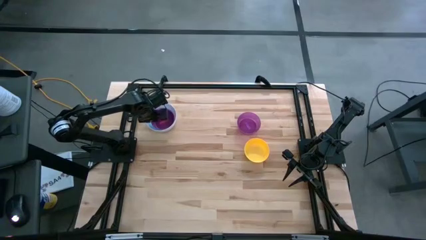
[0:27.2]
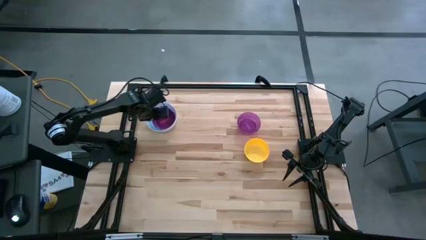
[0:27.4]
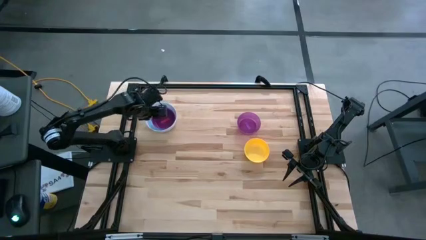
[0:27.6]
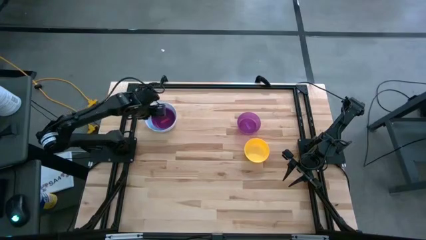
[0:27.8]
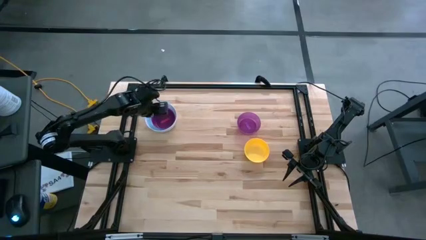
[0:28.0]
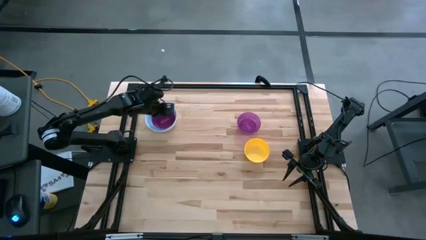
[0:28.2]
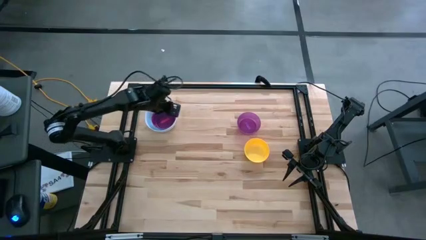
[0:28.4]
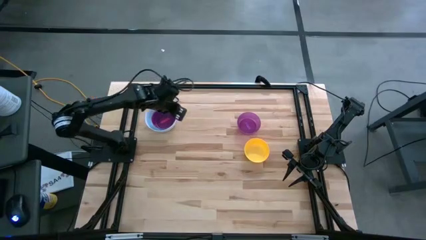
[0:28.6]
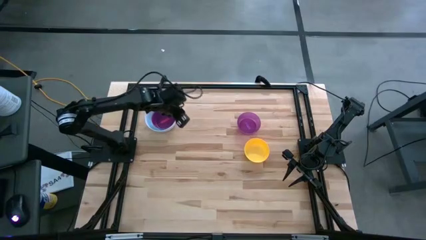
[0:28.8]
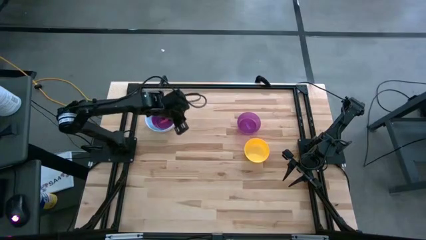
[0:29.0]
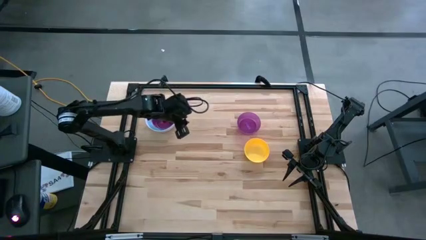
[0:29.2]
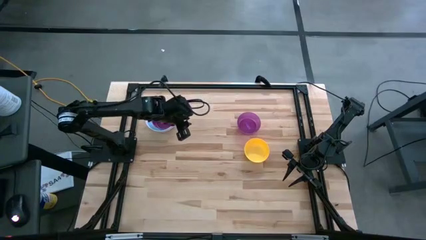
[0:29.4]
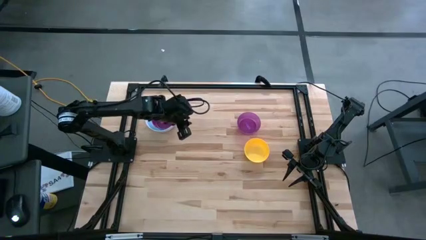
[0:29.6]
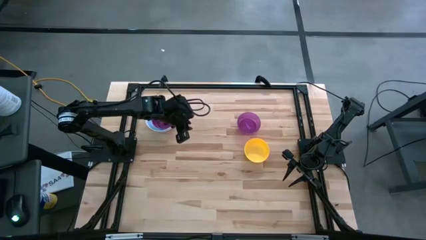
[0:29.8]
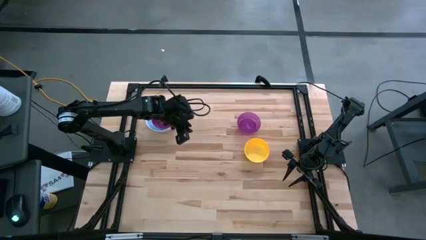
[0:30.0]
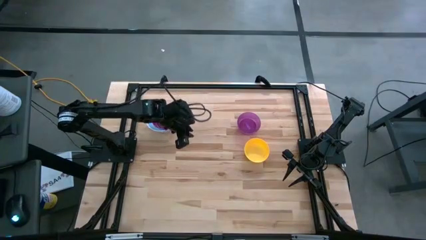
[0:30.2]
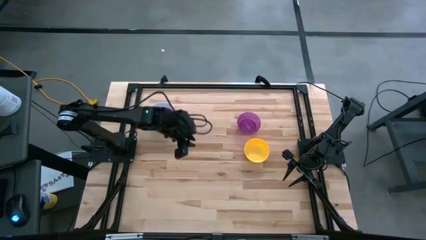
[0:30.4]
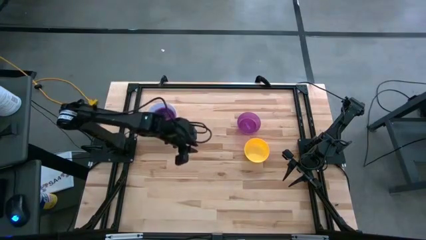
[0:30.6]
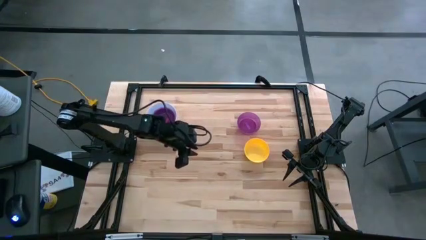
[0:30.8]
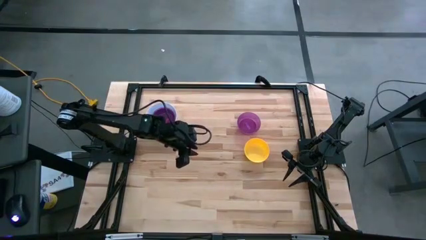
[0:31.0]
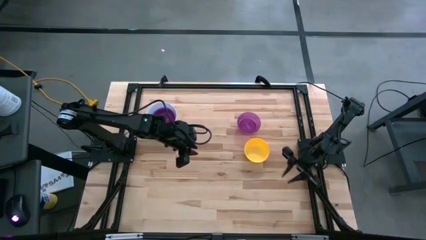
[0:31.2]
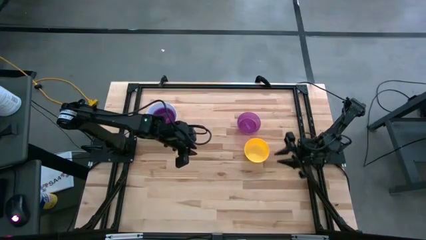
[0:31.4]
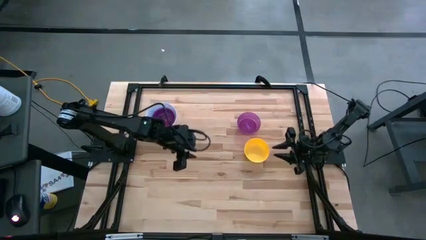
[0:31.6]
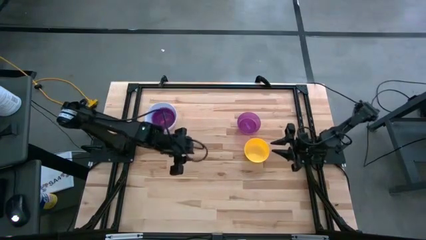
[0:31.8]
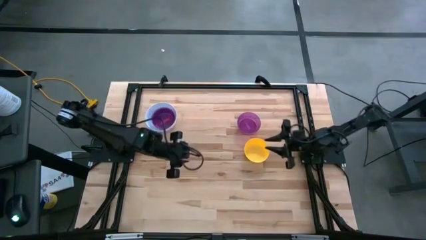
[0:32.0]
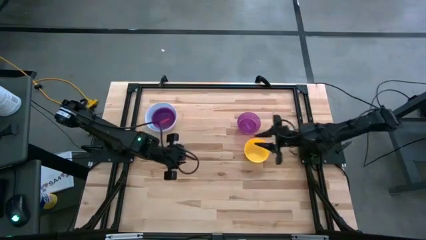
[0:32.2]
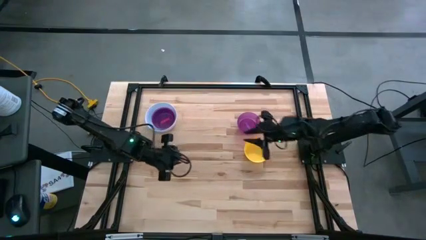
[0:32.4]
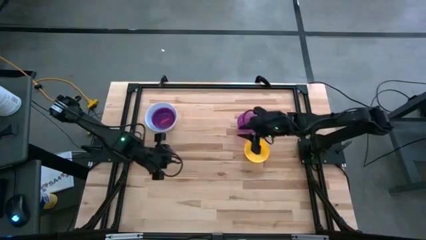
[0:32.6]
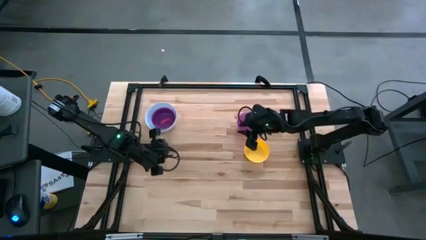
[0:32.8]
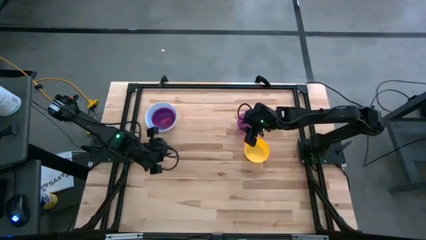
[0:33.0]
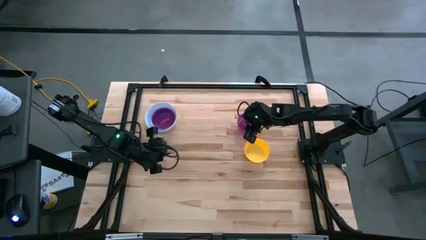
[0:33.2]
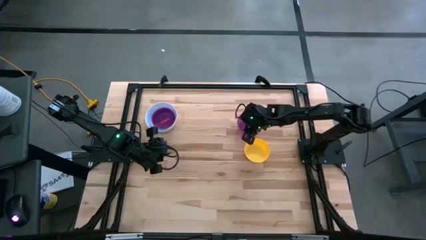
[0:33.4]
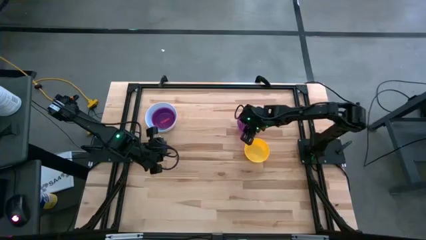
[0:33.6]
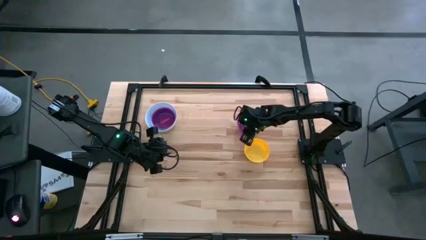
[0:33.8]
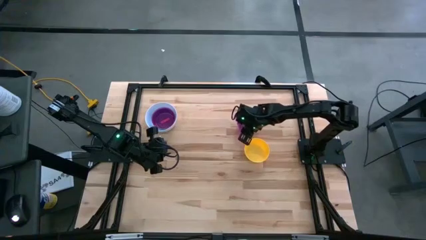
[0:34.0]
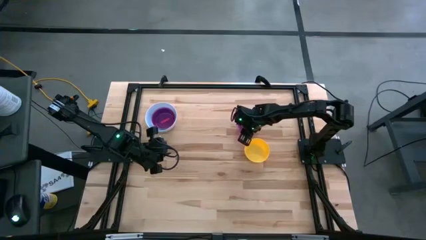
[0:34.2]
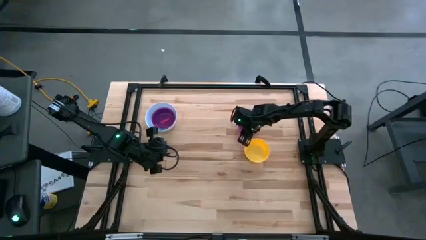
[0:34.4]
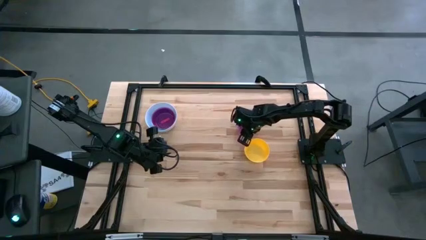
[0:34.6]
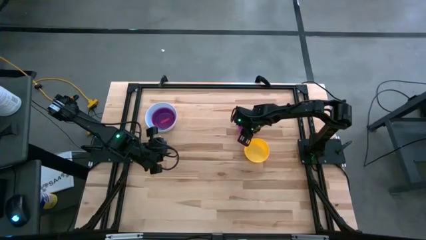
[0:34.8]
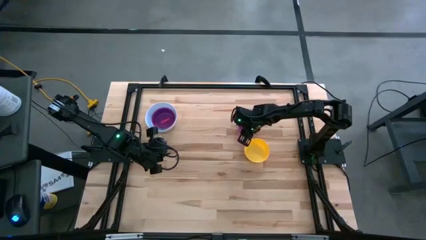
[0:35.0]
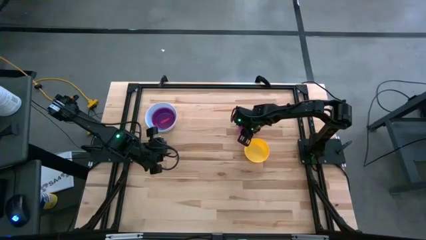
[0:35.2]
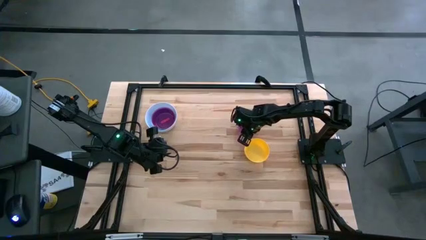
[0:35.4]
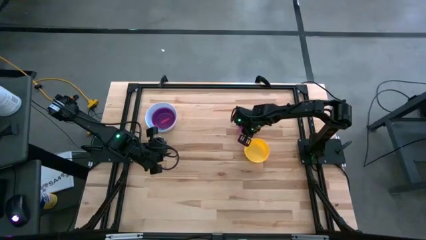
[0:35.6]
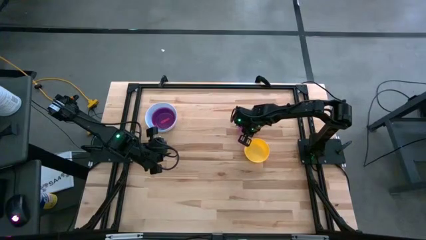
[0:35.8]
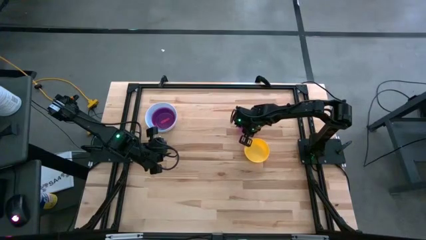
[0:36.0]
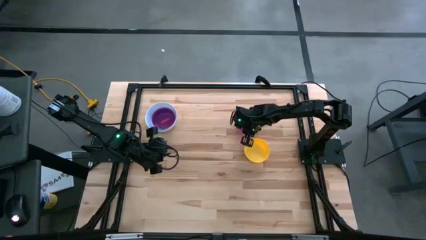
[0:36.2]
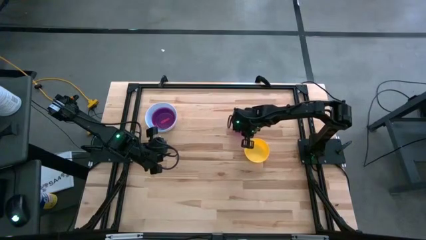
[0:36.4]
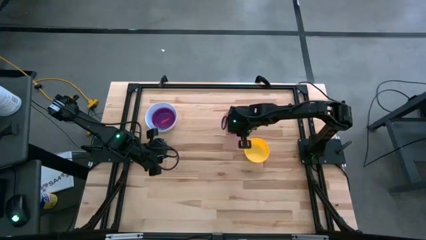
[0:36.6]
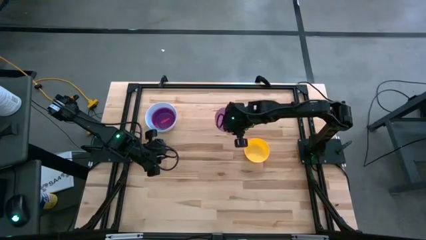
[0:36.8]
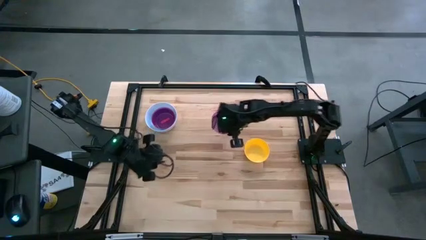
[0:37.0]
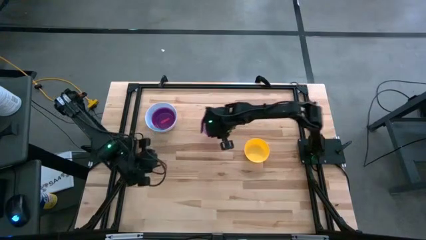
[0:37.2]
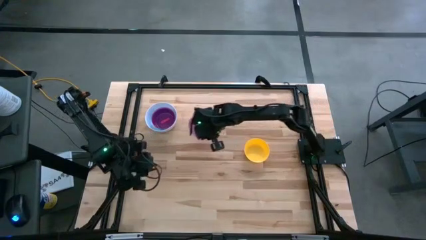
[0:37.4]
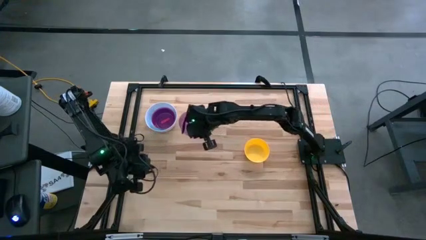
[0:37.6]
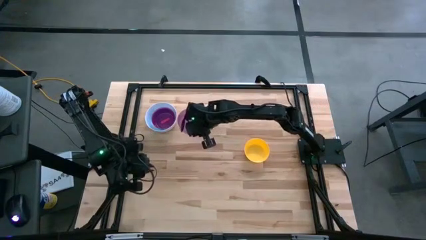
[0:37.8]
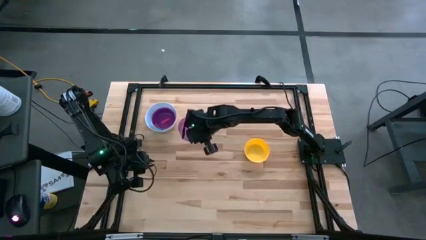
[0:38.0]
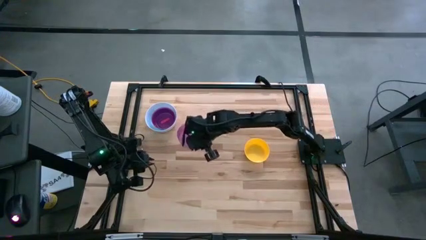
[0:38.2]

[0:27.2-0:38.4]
Stack the violet bowl on top of the red bowl
